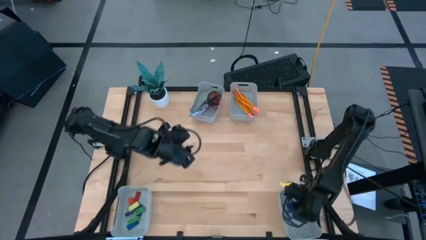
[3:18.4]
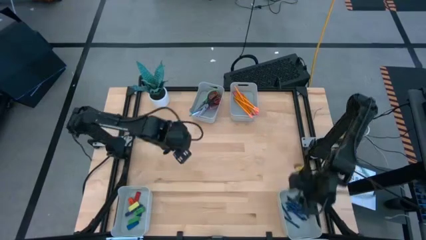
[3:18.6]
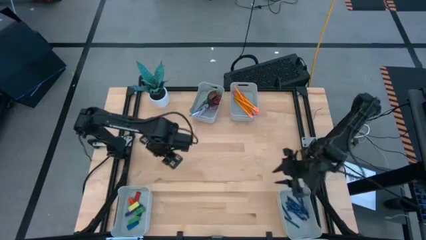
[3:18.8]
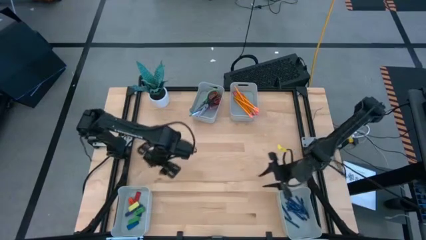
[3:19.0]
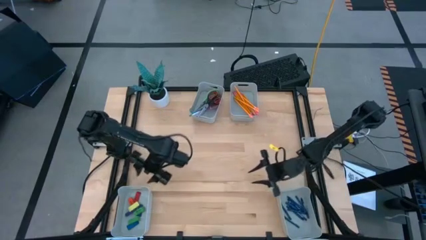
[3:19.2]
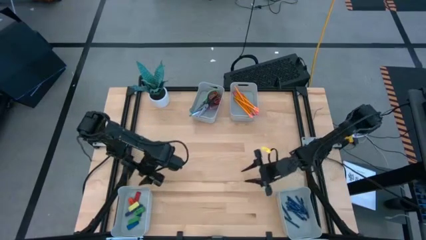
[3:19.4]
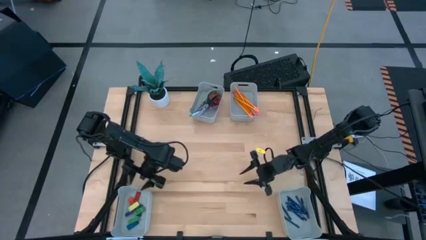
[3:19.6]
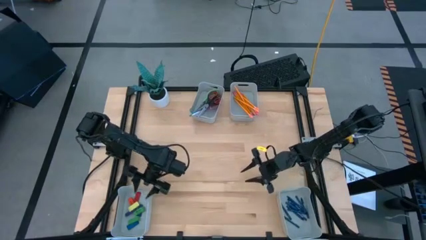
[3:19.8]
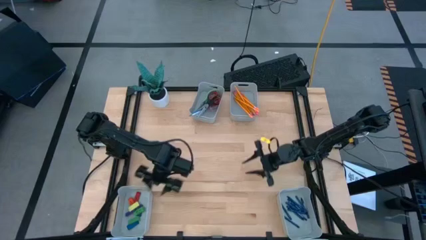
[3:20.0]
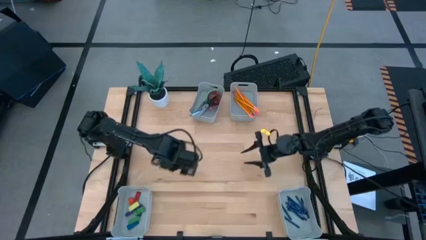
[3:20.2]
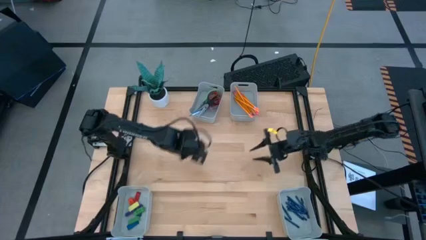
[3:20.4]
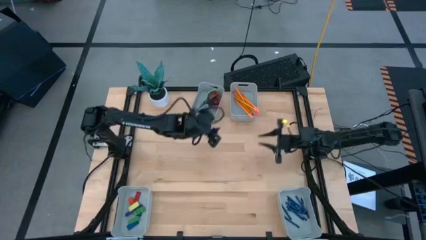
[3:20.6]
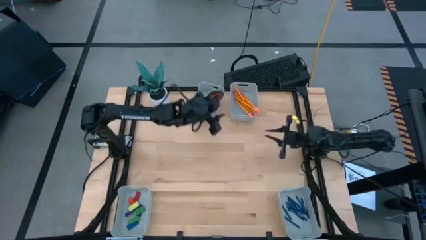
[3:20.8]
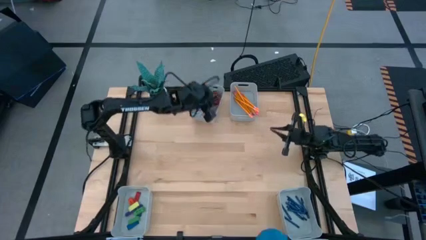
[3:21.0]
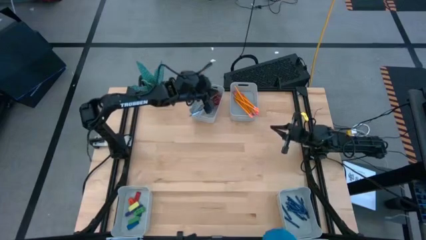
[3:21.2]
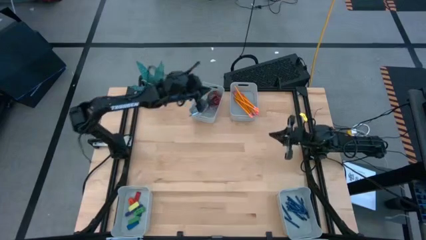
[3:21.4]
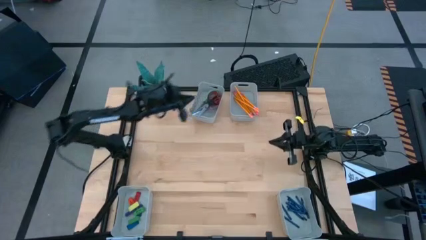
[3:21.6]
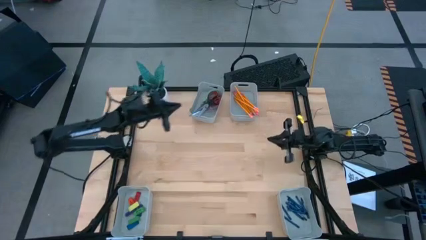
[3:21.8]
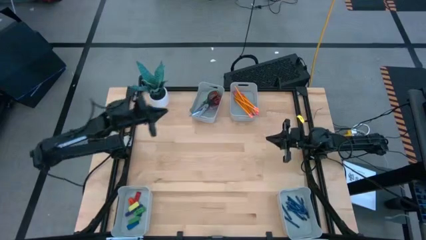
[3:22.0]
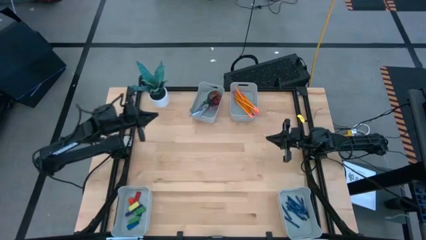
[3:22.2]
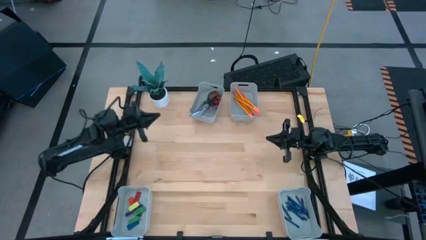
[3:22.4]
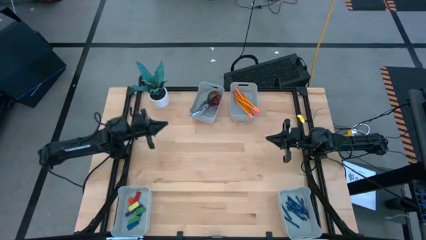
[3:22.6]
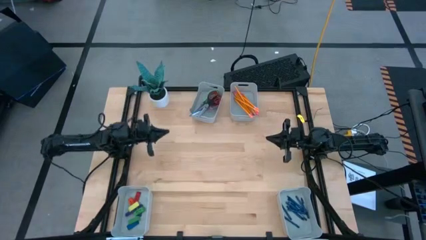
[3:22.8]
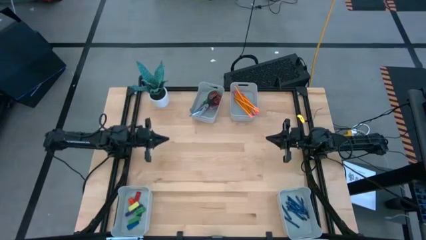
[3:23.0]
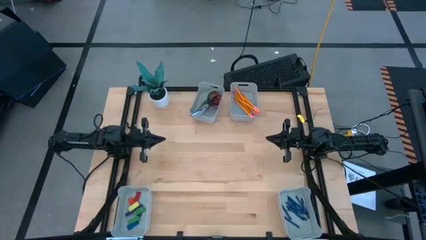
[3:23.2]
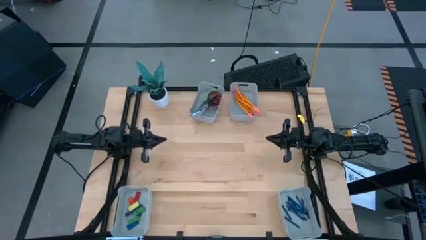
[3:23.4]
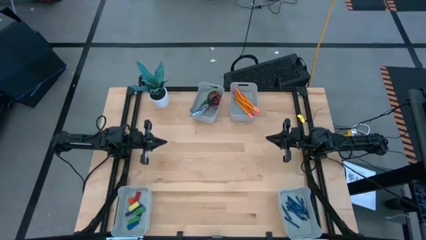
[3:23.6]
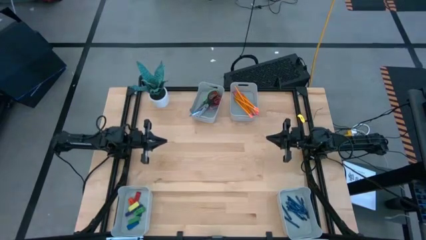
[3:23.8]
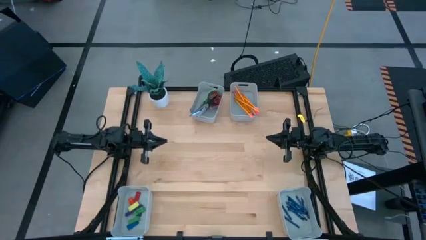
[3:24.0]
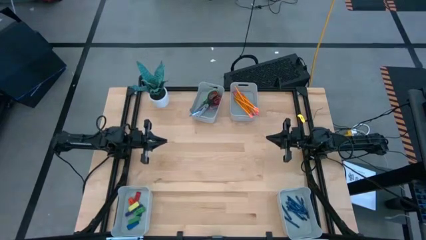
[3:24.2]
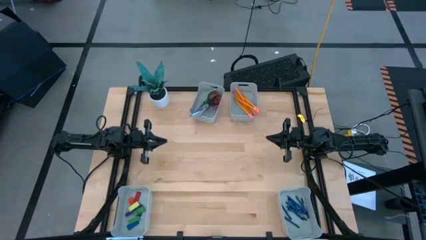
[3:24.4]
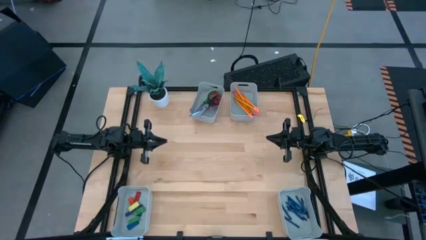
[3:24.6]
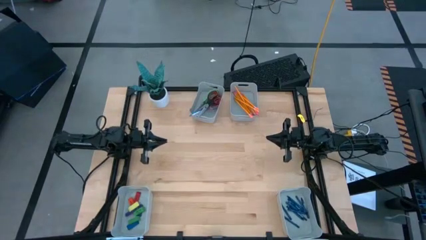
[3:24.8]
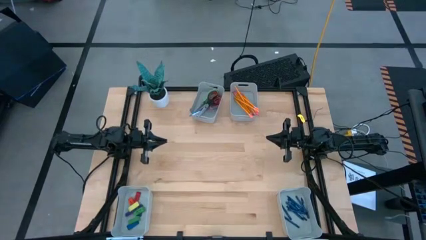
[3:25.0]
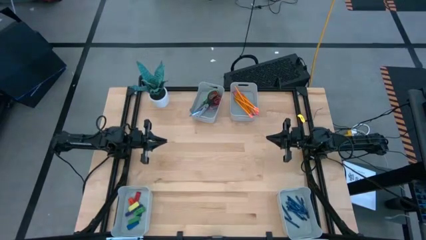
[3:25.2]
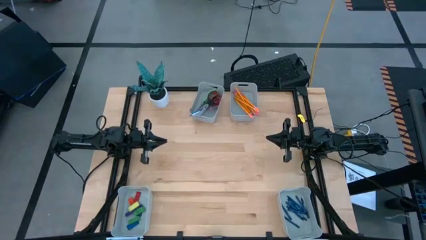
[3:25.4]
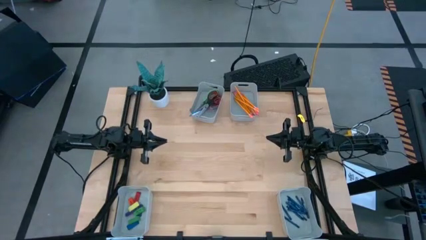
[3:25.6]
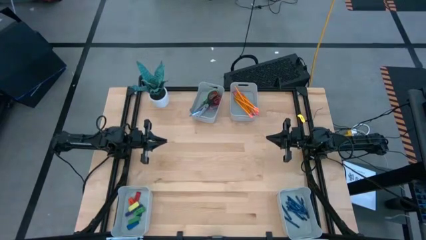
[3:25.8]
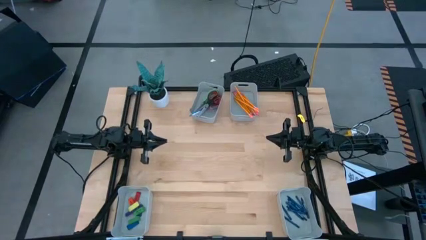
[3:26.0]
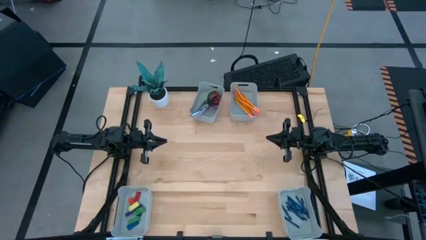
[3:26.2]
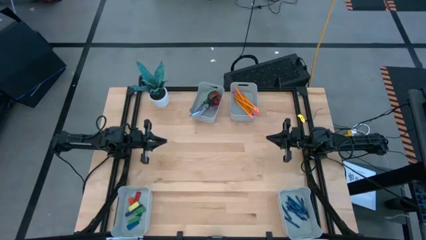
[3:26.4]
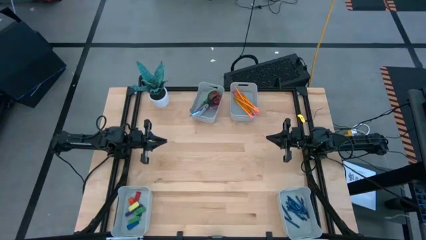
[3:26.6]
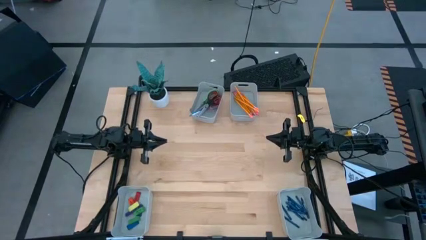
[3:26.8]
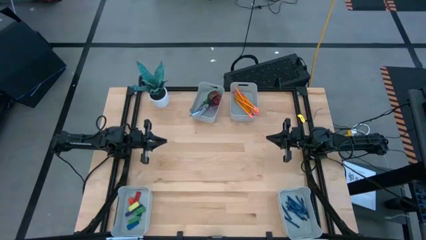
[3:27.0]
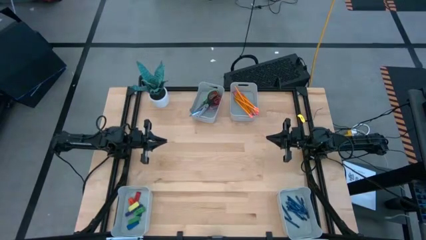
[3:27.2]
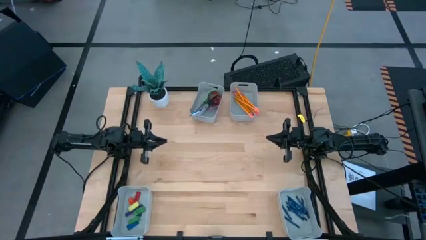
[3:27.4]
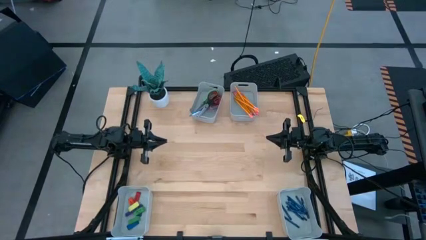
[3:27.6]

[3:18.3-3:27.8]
Task: Sort crayons/erasers/pens/pencils in bins
Return to Home Position

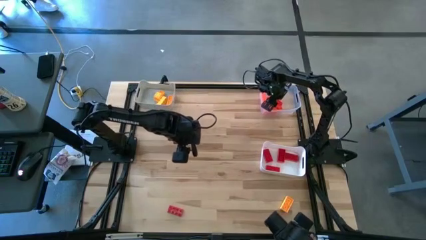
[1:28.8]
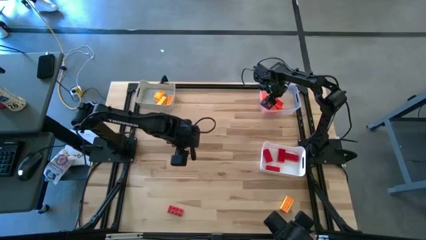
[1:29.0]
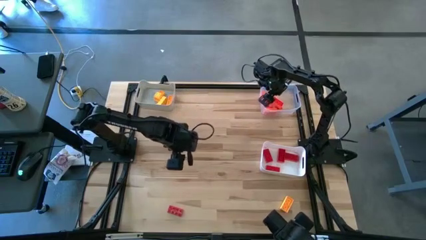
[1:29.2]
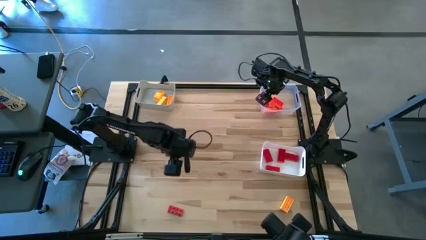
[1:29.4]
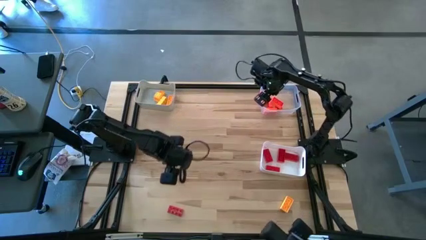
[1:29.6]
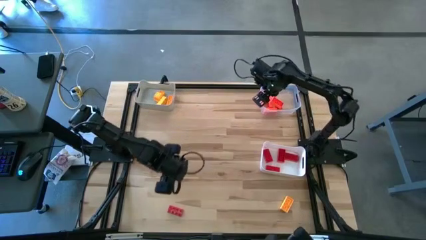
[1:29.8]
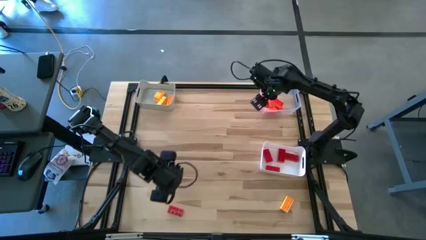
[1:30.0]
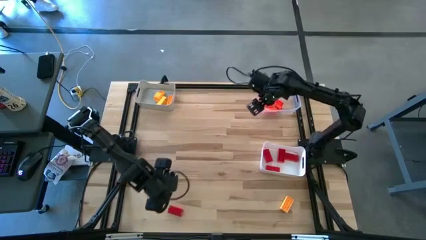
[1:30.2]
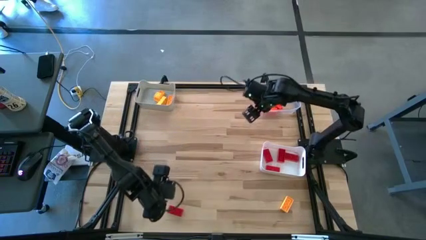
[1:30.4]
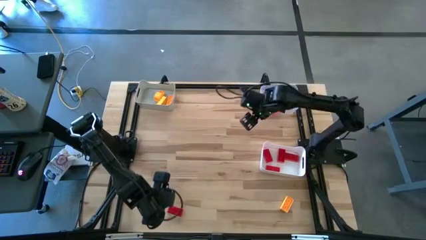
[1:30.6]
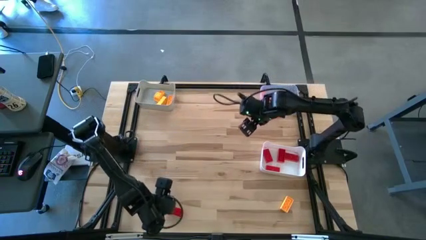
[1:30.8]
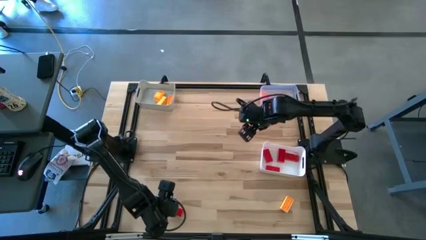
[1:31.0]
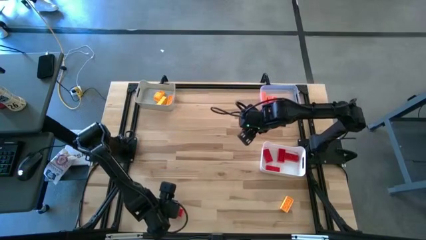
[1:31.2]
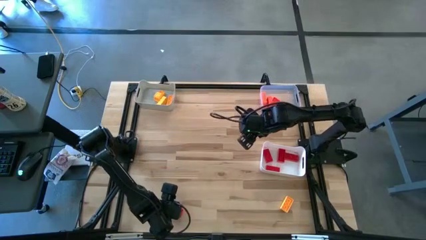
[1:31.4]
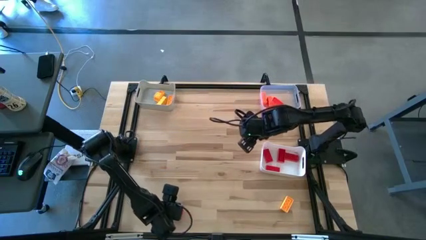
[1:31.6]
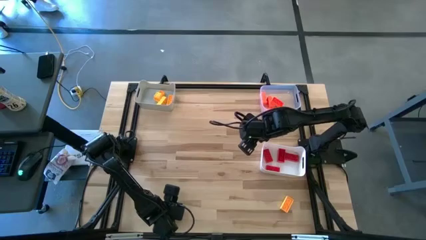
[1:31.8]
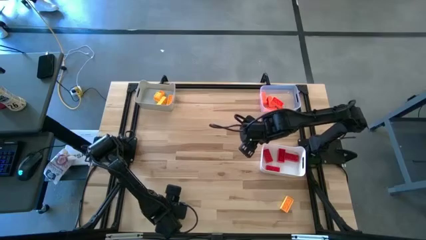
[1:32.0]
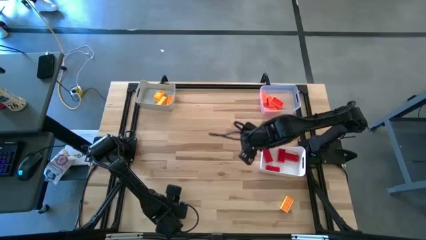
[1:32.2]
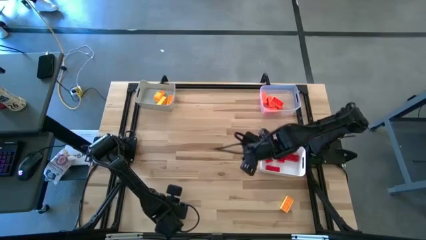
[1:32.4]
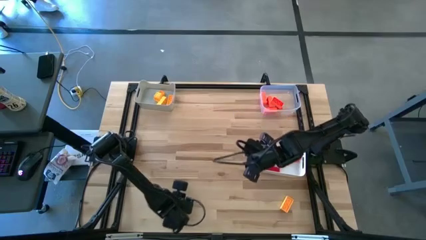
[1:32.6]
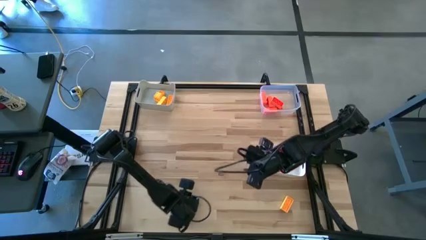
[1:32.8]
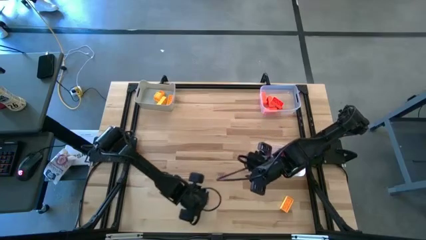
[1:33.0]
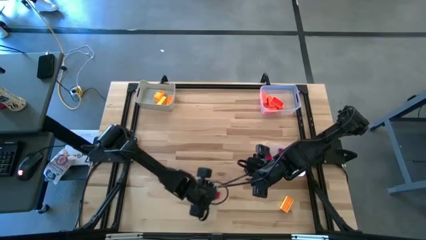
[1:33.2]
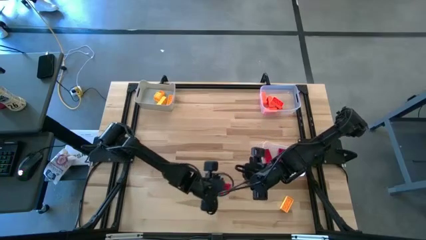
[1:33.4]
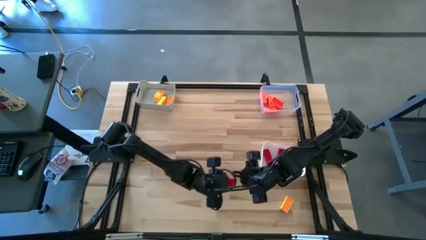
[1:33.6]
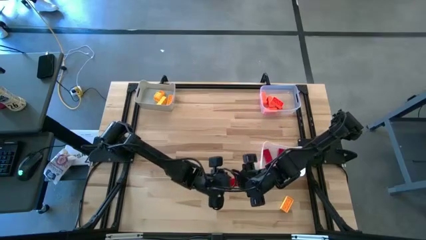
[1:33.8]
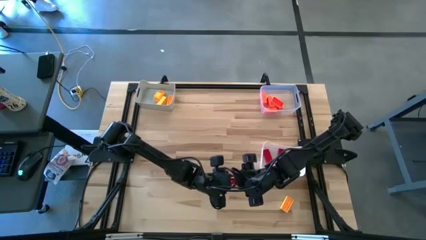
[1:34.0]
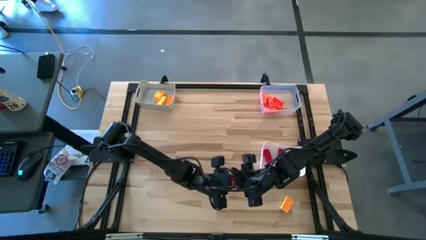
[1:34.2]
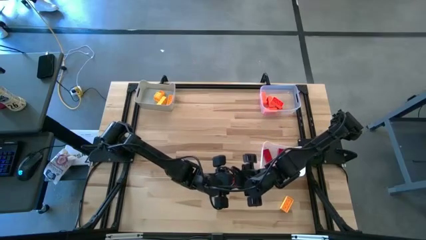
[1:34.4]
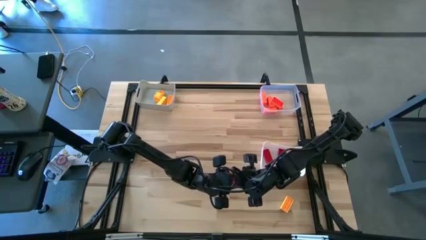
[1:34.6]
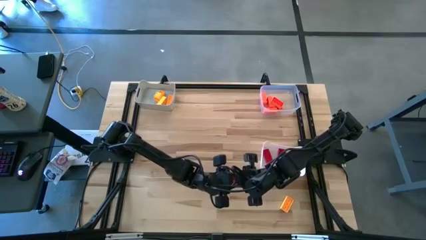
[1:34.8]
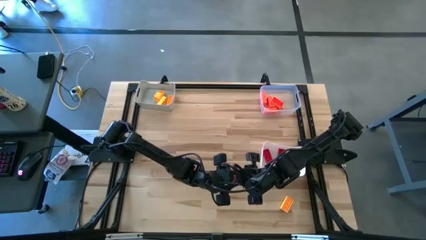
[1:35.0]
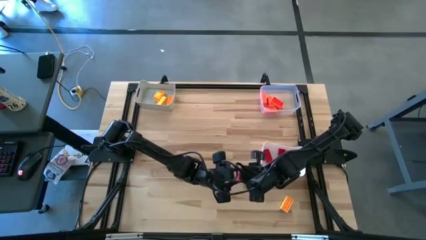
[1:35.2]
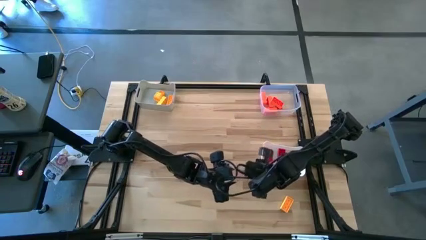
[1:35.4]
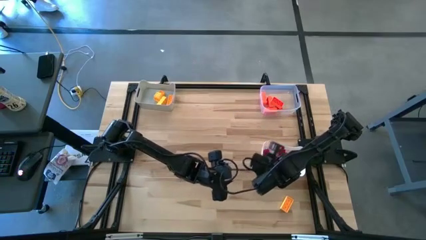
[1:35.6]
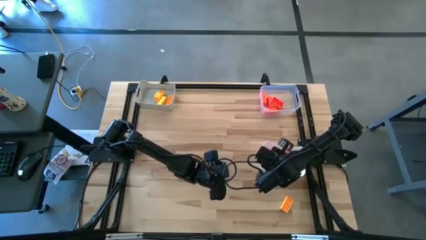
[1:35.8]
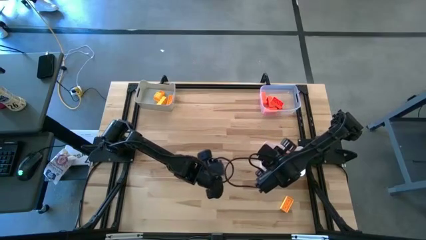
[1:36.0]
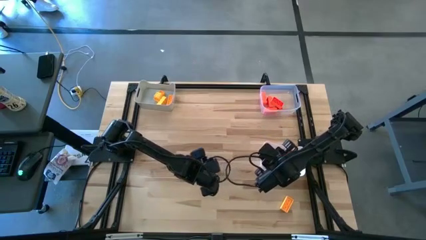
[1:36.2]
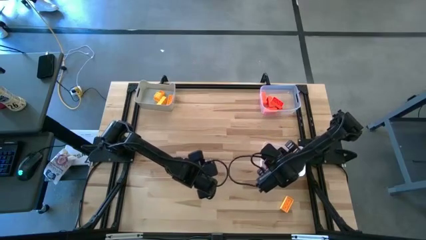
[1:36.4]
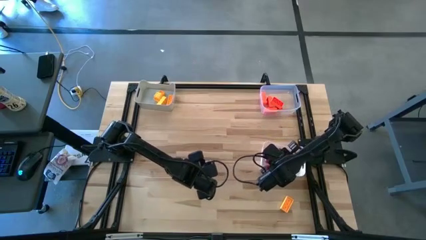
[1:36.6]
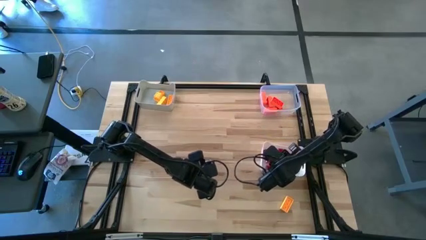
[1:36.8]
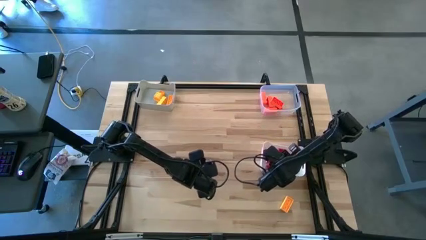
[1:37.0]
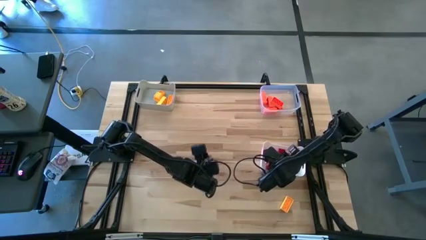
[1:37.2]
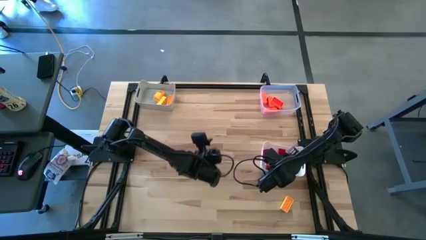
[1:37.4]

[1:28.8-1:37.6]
Task: Sort & place blocks by color
Put the red block into the white bin
